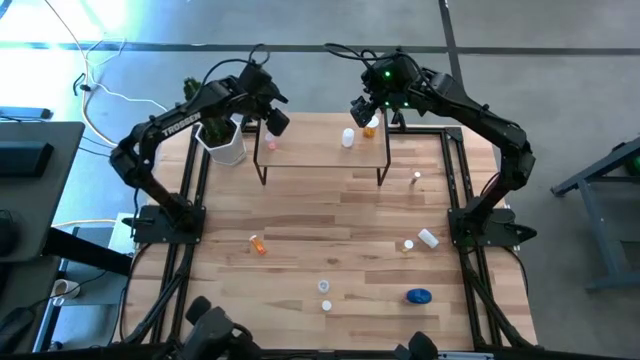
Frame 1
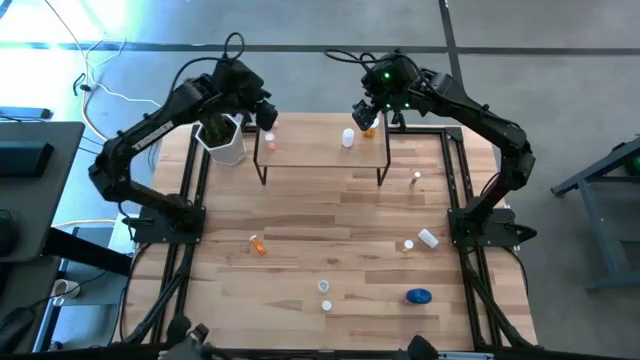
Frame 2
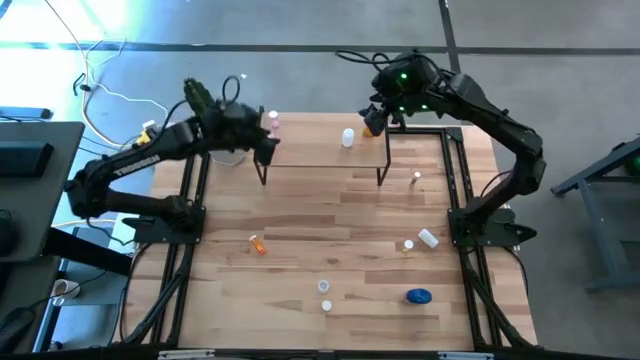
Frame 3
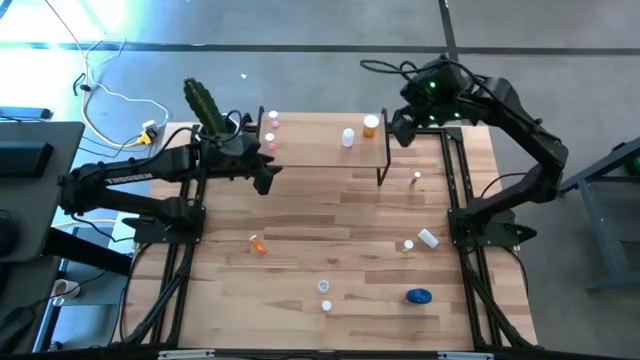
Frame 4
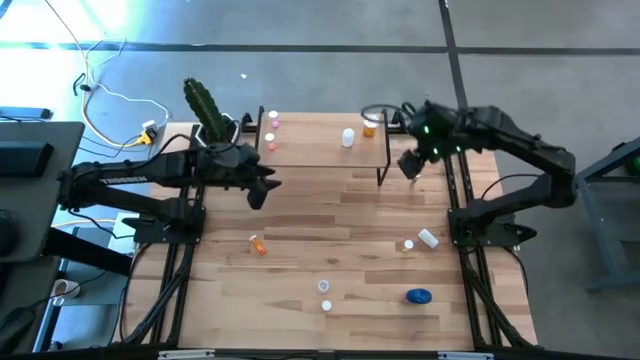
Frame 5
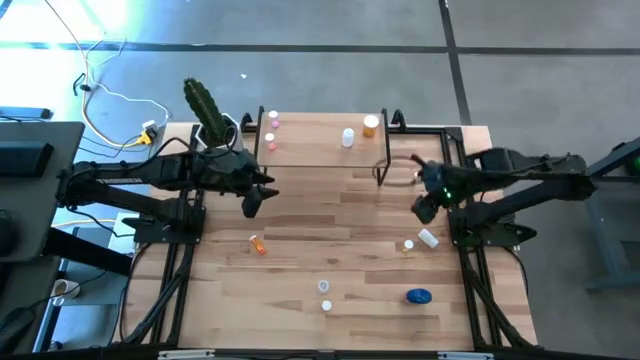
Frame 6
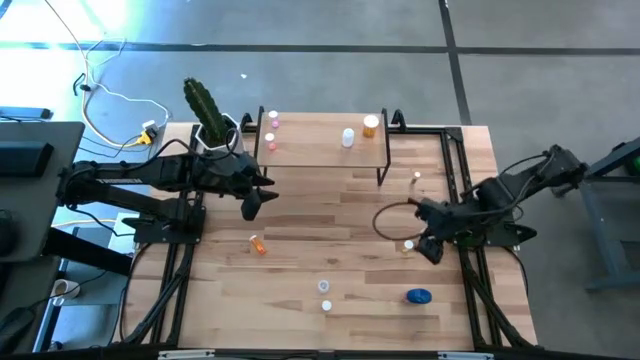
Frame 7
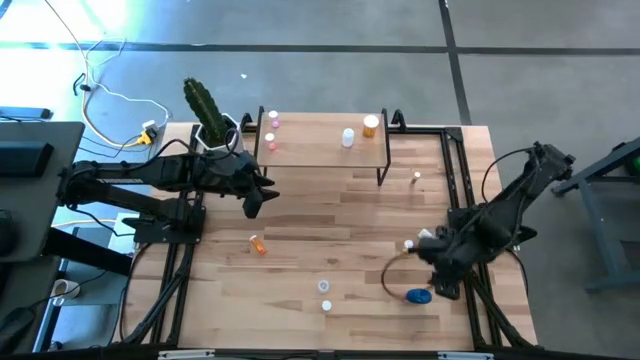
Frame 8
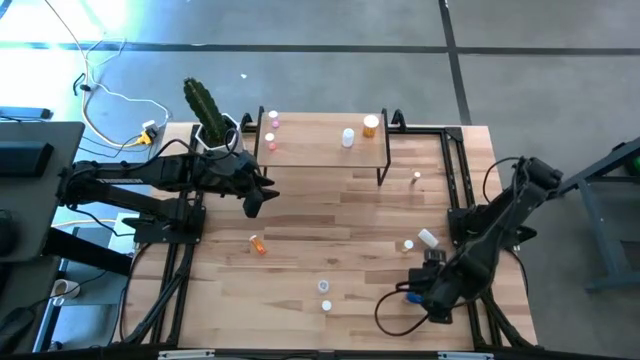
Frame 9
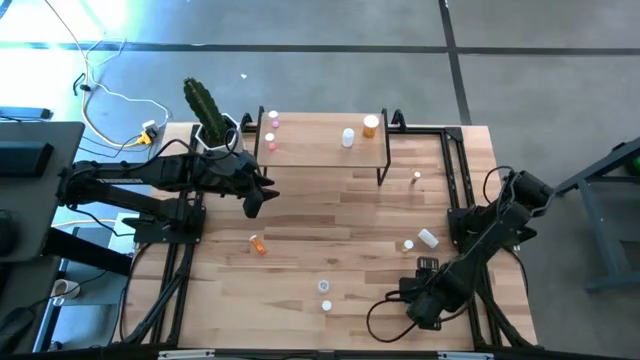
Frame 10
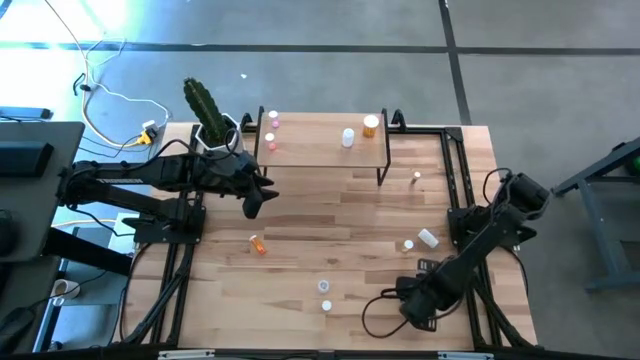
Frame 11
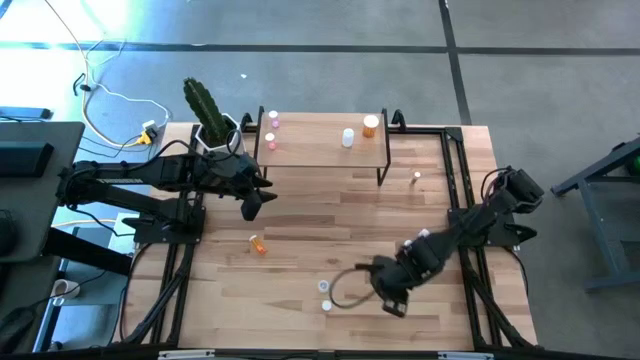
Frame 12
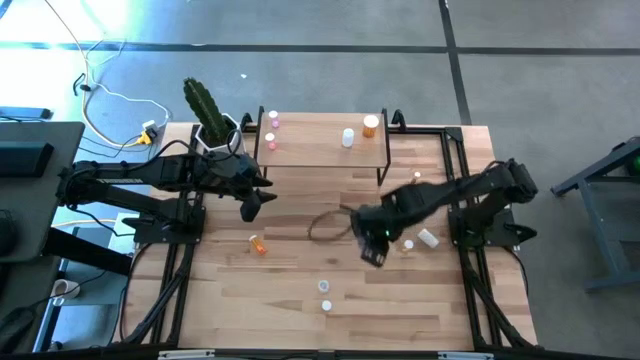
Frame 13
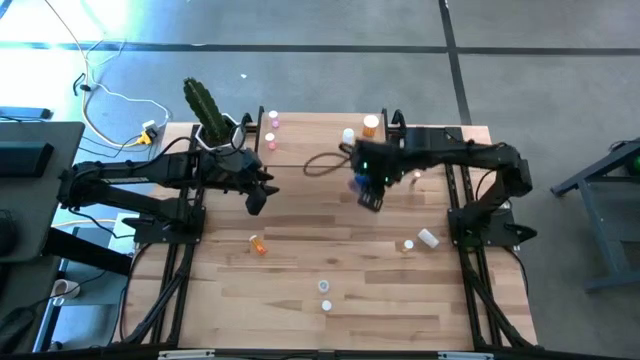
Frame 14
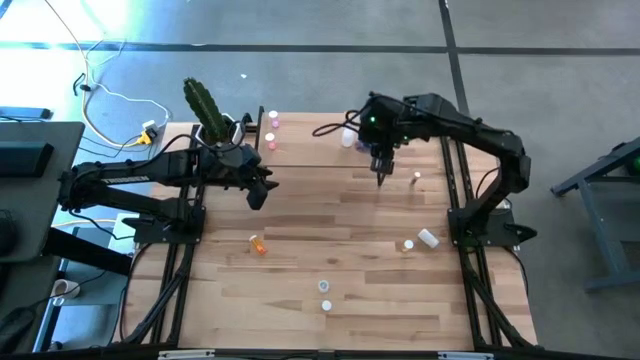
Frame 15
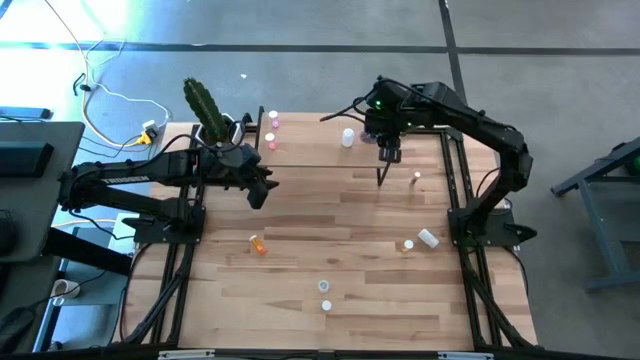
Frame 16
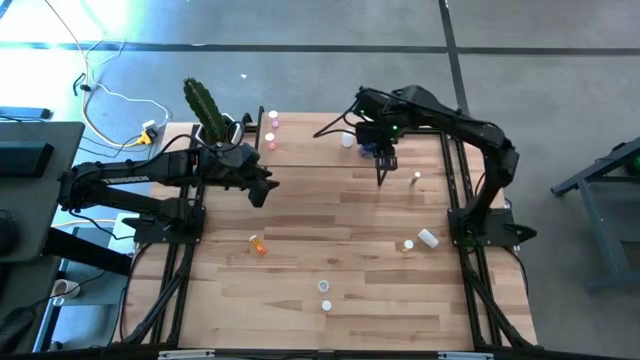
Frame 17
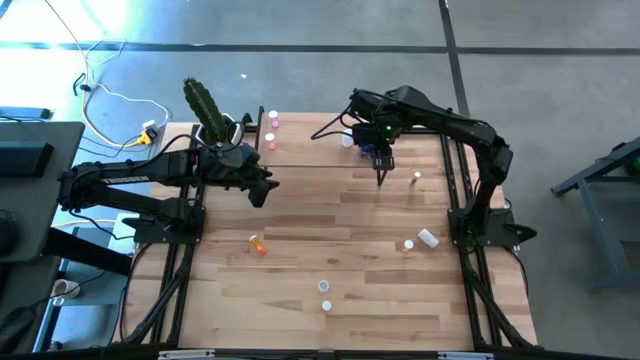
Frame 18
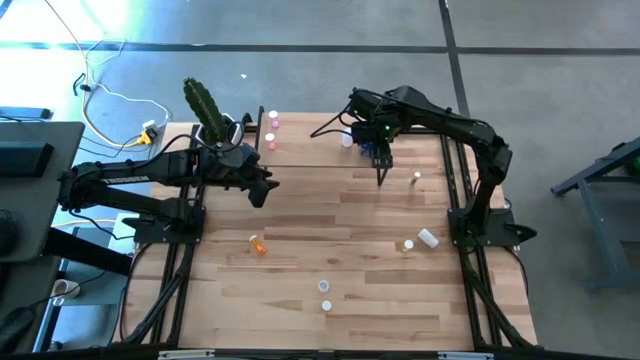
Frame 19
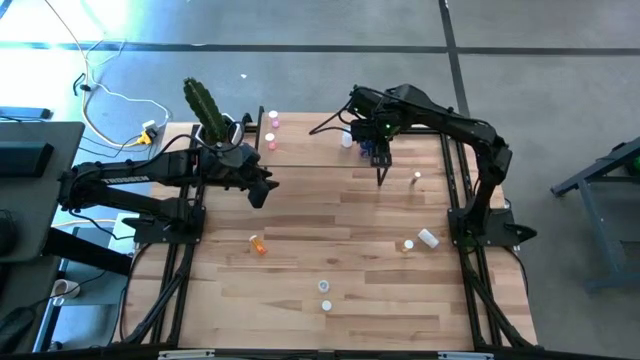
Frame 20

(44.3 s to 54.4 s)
Task: Pick and place medicine bottles onto shelf by color
Put the blue lid pill bottle on the shelf

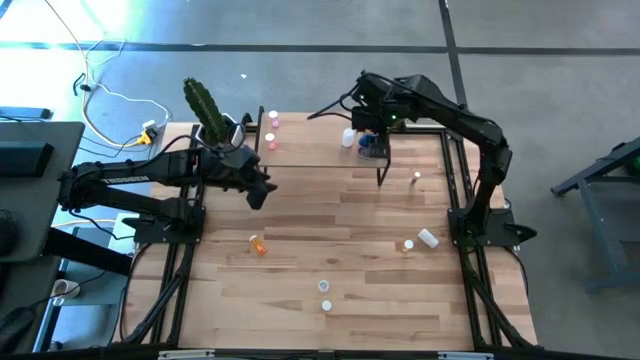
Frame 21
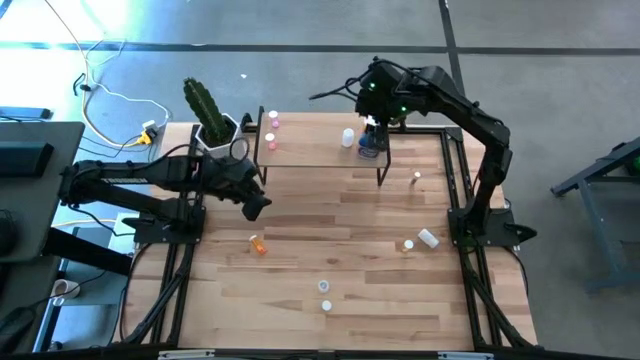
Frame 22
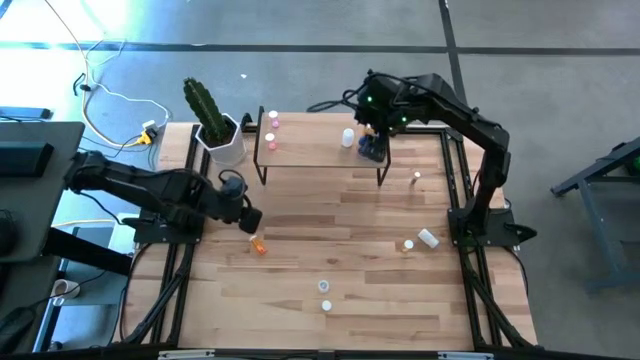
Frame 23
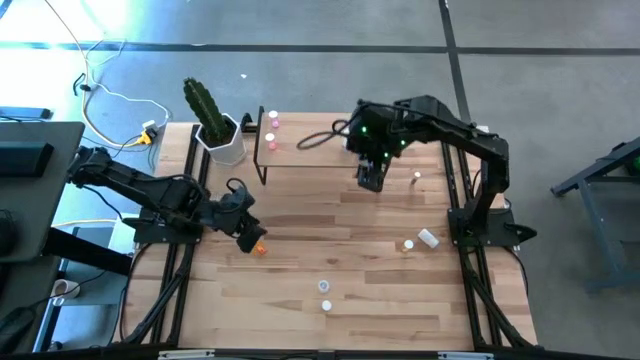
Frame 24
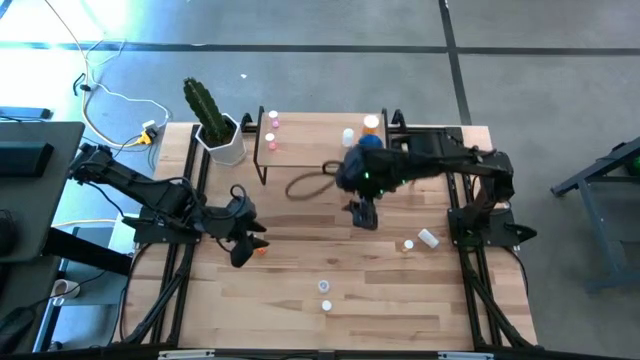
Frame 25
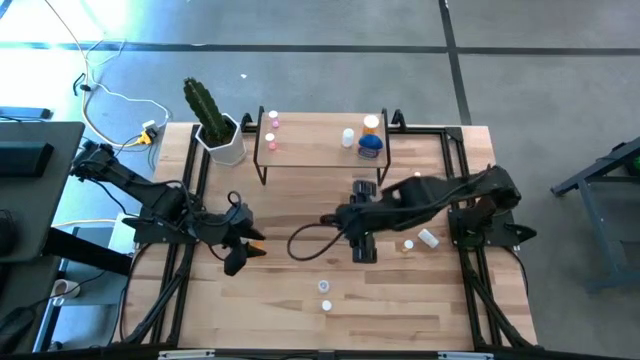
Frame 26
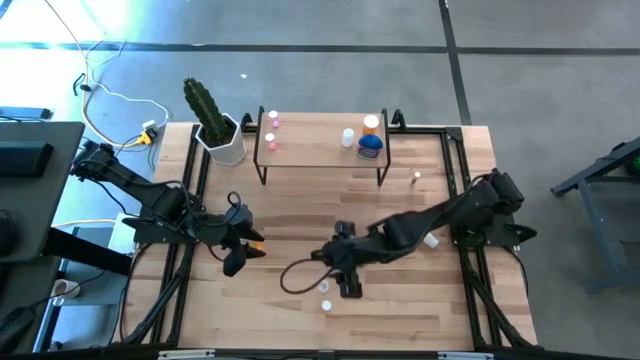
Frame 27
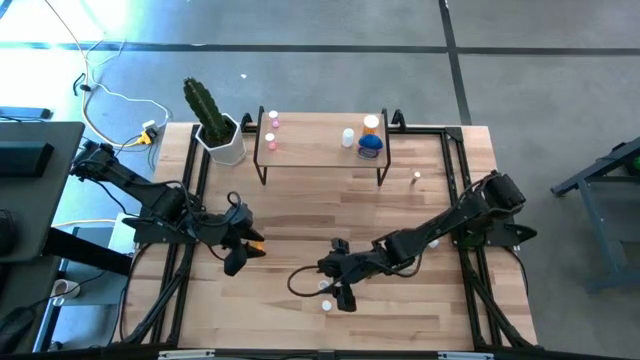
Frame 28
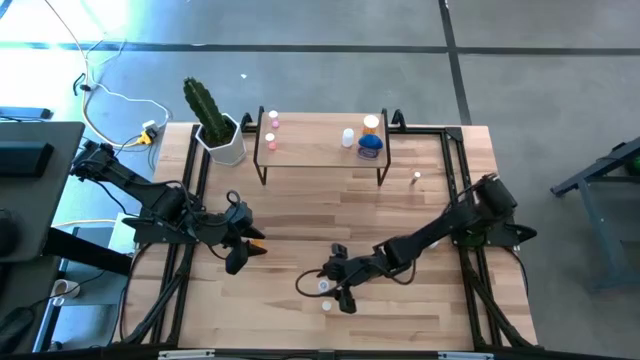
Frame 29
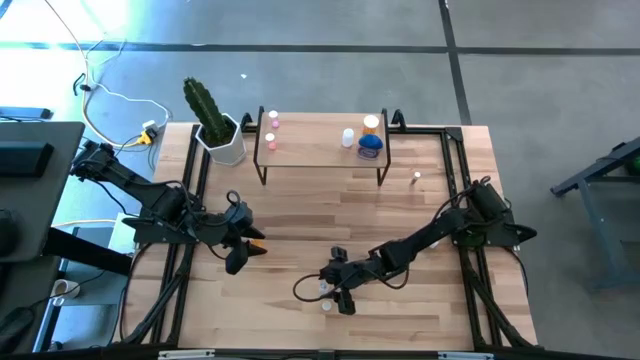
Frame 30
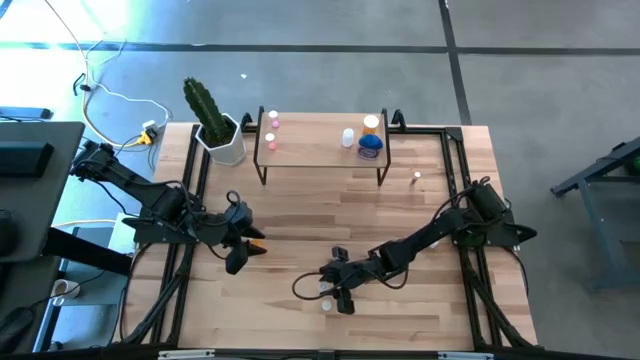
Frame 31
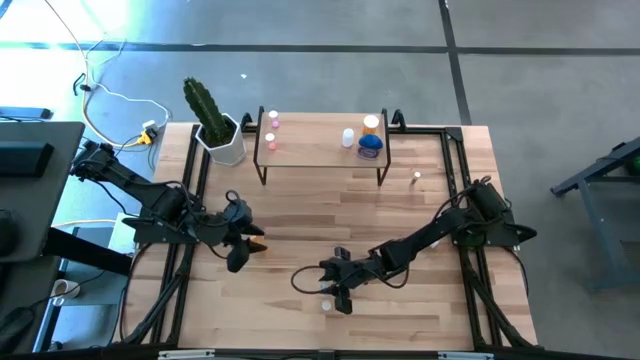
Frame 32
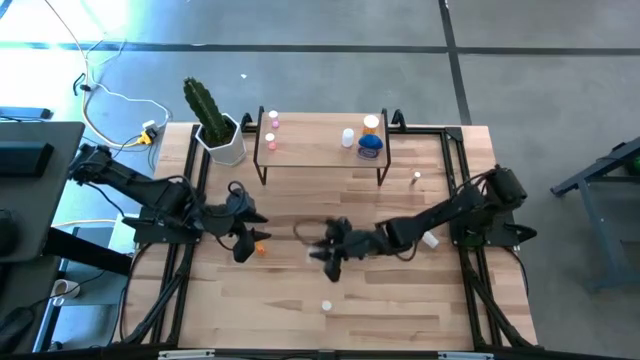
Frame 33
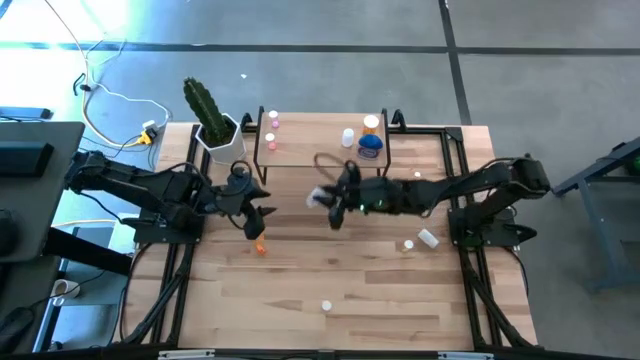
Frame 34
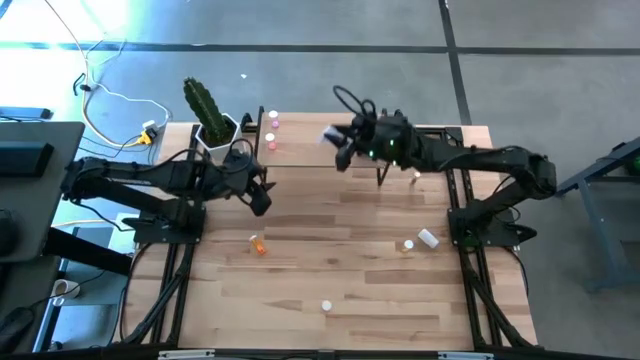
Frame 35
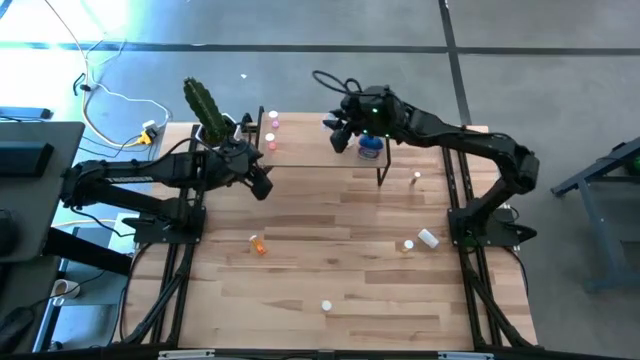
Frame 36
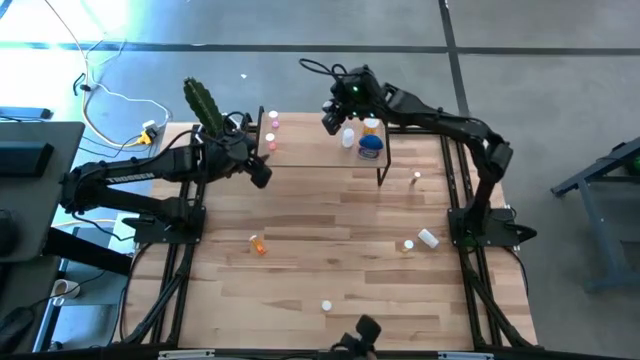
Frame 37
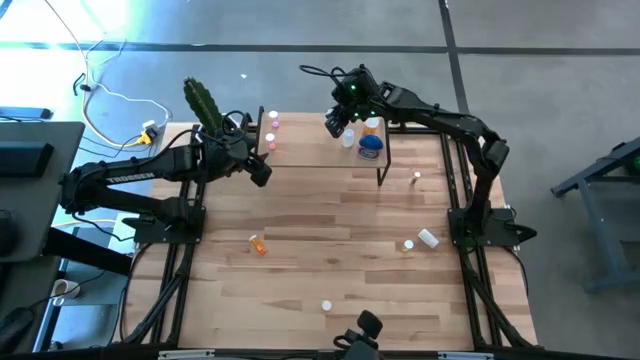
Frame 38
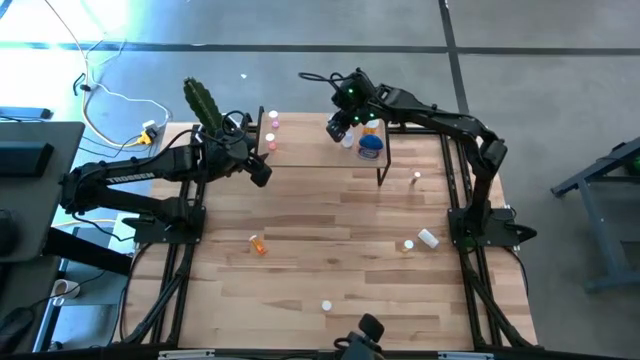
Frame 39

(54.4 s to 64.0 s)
Put the transparent pill bottle on the shelf

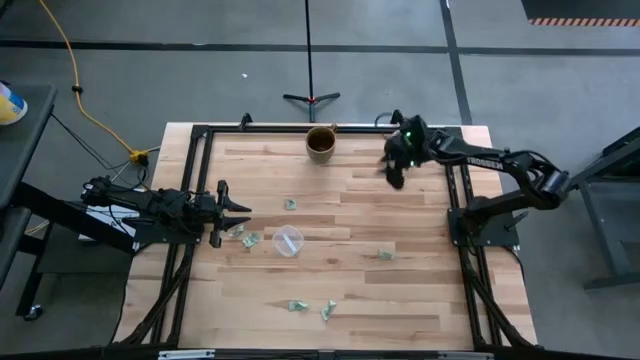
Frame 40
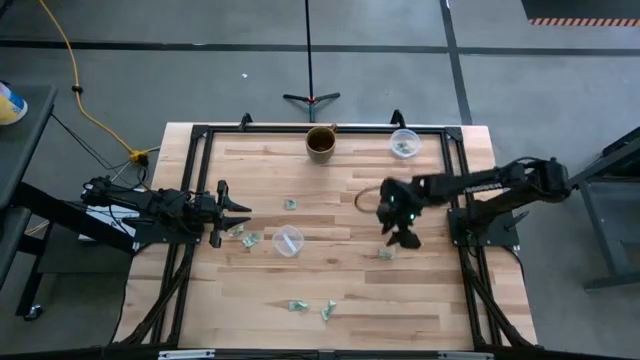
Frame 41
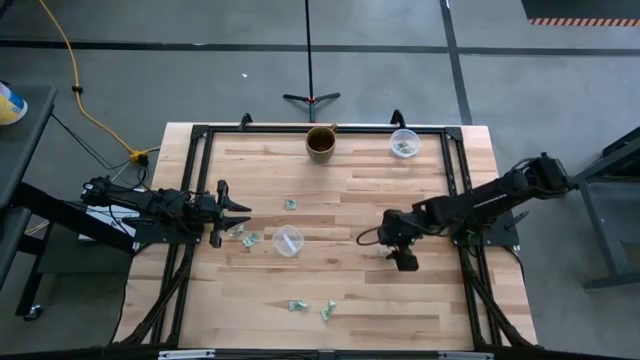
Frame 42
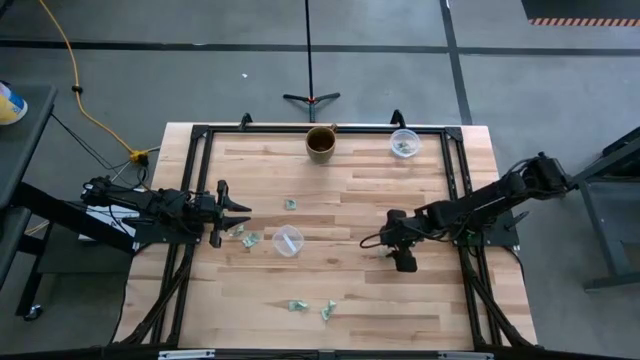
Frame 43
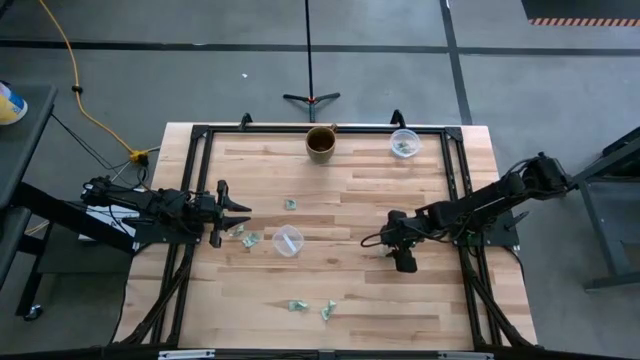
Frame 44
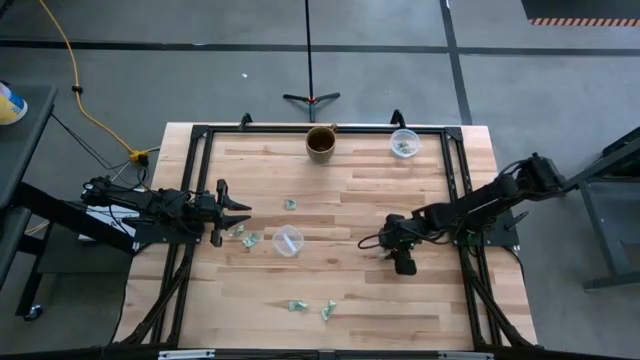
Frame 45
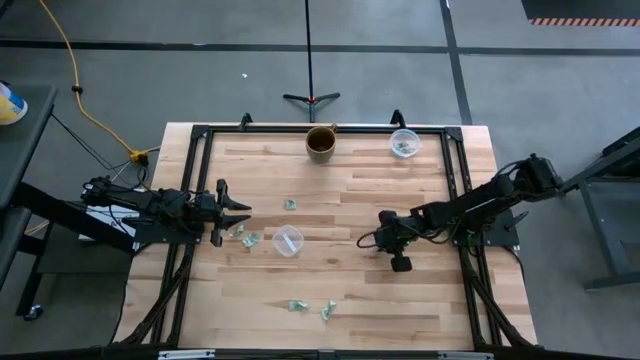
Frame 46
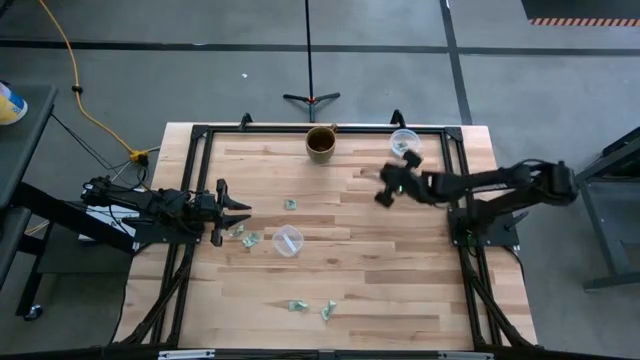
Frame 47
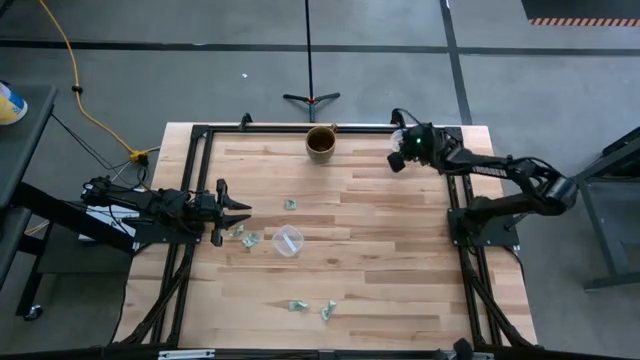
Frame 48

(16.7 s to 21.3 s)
Task: Pick and place items into bin
Put the stevia packet into the top transparent bin
